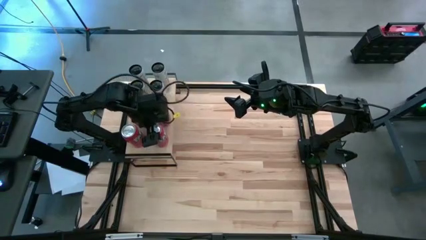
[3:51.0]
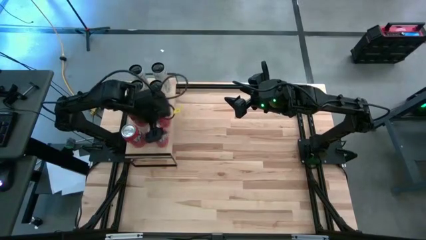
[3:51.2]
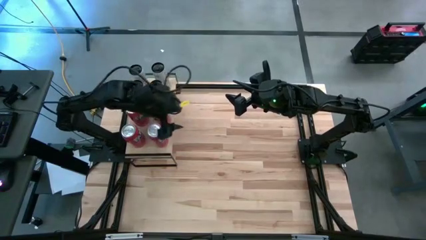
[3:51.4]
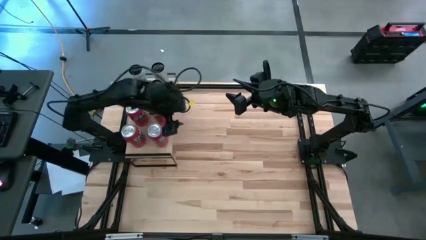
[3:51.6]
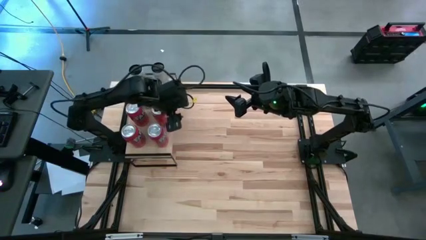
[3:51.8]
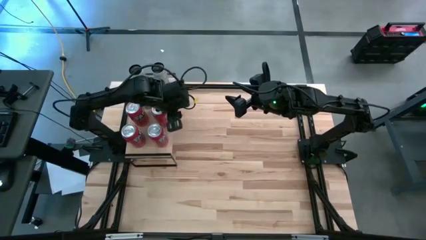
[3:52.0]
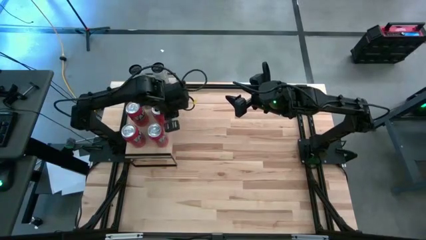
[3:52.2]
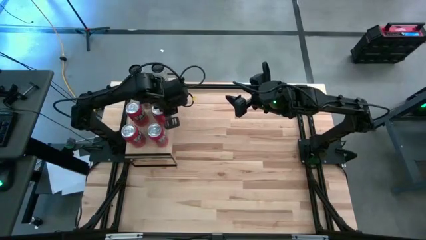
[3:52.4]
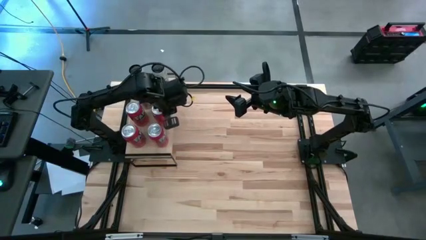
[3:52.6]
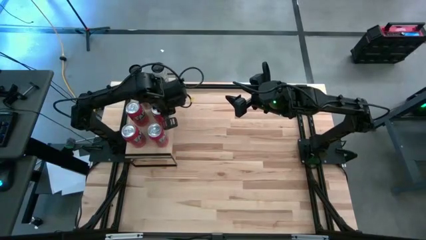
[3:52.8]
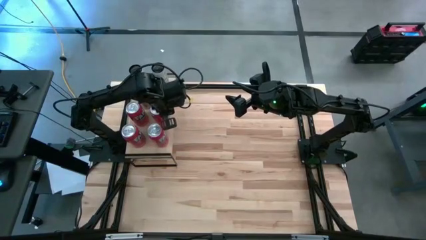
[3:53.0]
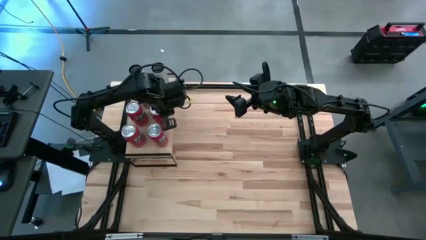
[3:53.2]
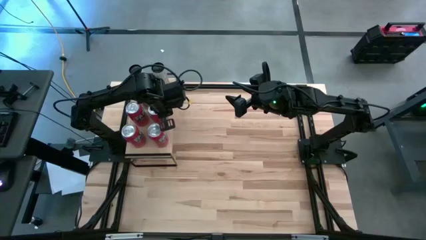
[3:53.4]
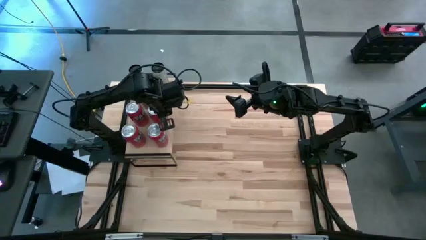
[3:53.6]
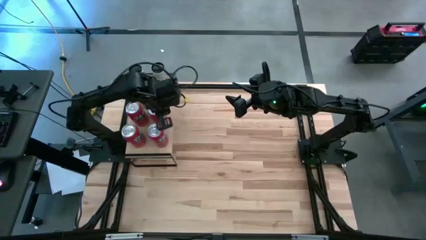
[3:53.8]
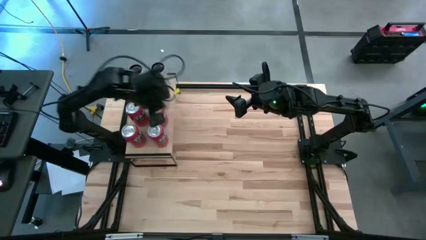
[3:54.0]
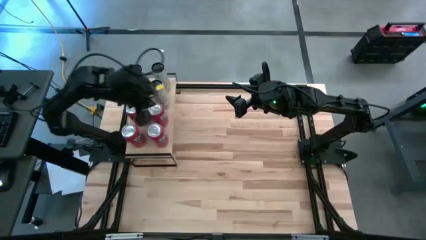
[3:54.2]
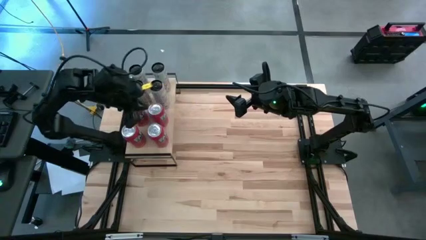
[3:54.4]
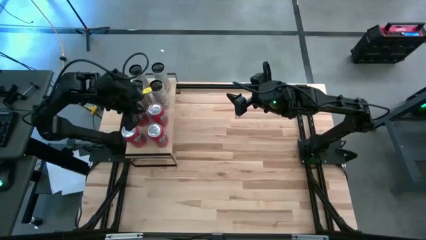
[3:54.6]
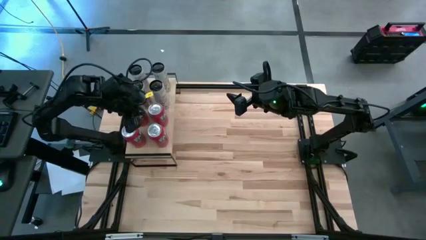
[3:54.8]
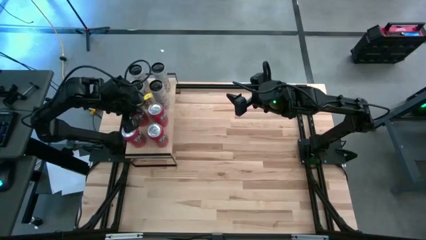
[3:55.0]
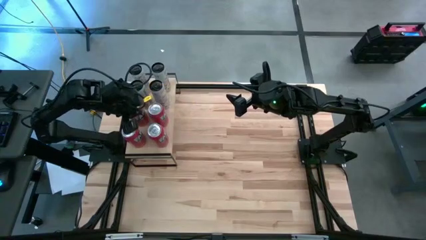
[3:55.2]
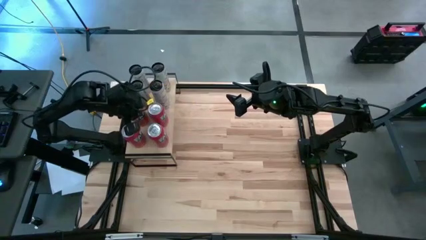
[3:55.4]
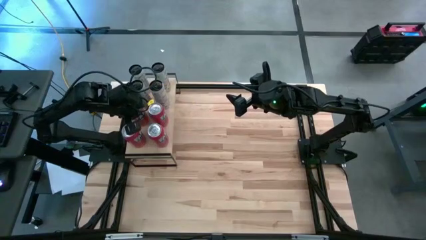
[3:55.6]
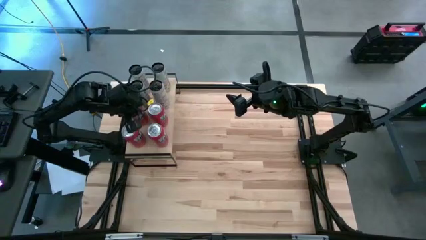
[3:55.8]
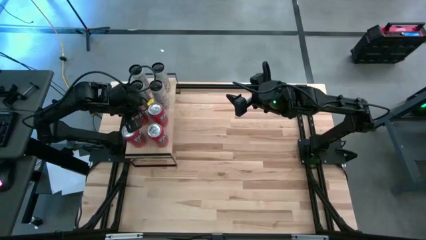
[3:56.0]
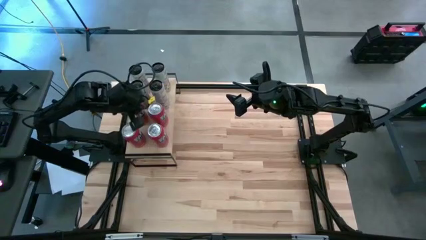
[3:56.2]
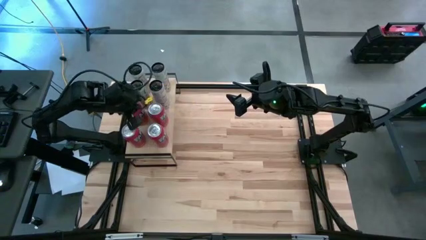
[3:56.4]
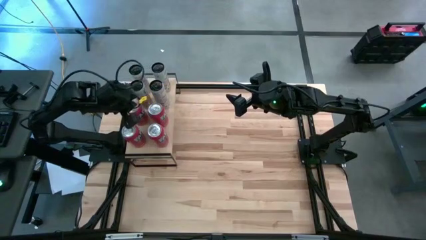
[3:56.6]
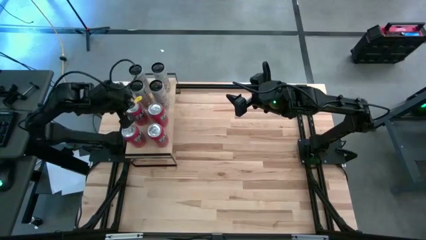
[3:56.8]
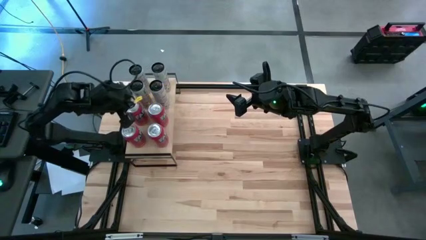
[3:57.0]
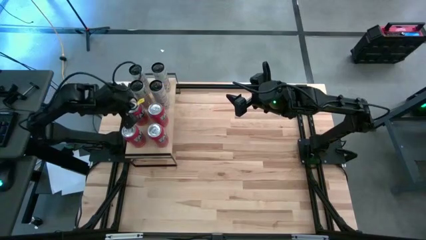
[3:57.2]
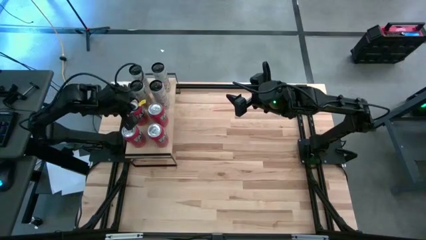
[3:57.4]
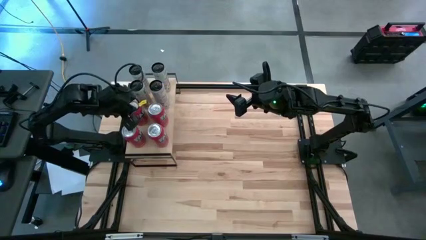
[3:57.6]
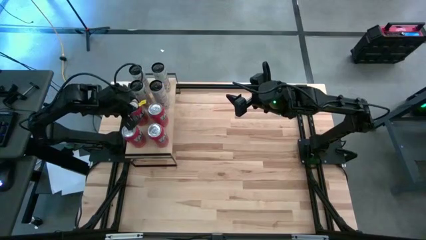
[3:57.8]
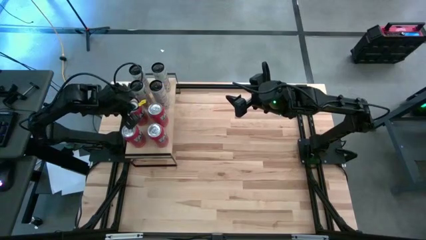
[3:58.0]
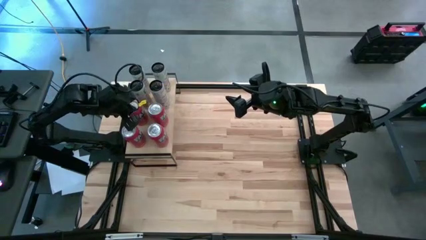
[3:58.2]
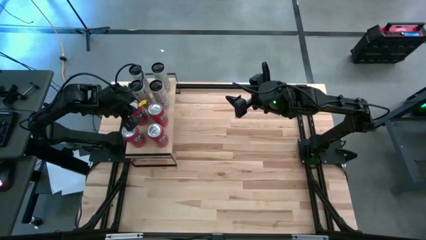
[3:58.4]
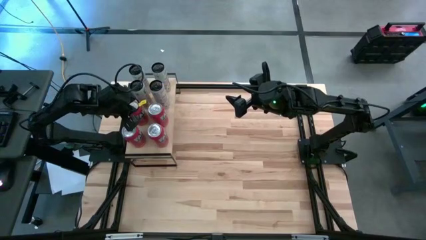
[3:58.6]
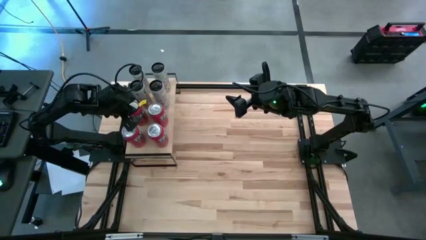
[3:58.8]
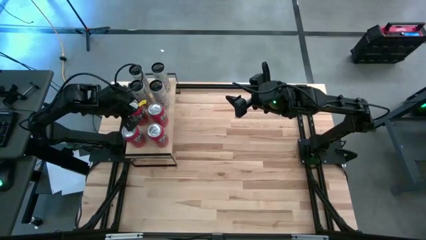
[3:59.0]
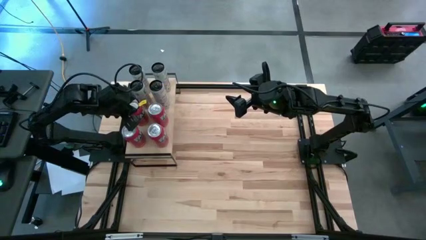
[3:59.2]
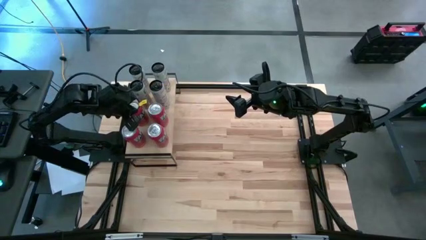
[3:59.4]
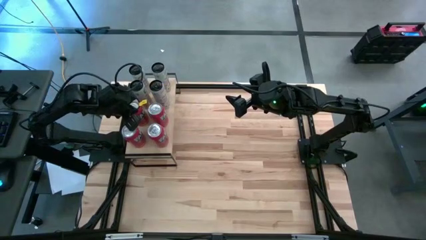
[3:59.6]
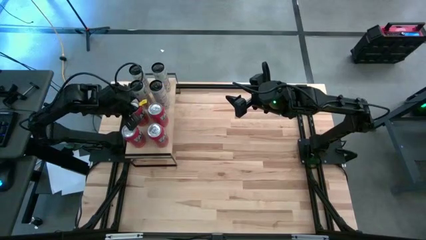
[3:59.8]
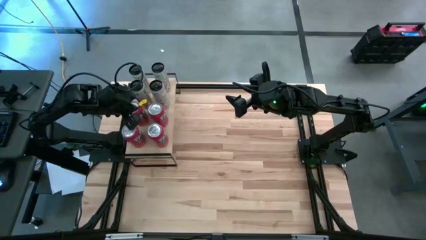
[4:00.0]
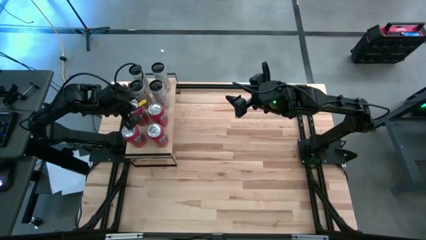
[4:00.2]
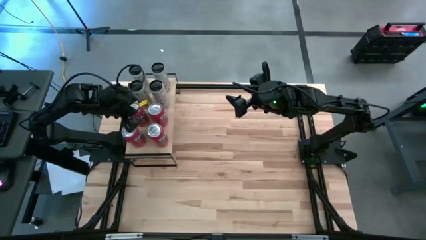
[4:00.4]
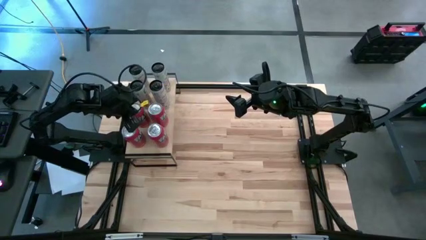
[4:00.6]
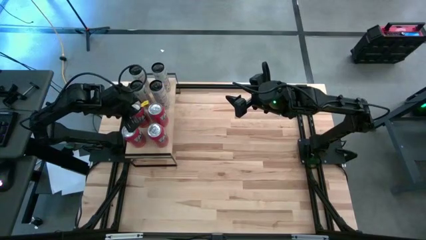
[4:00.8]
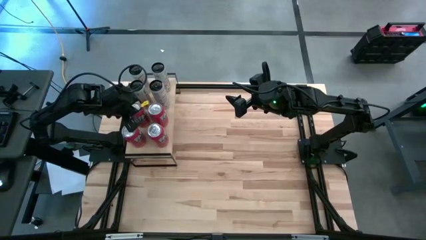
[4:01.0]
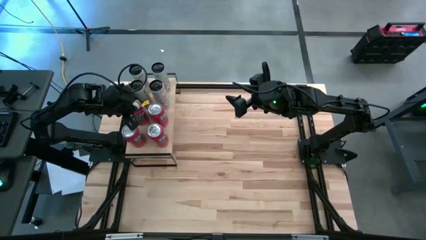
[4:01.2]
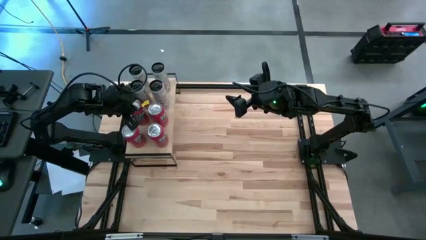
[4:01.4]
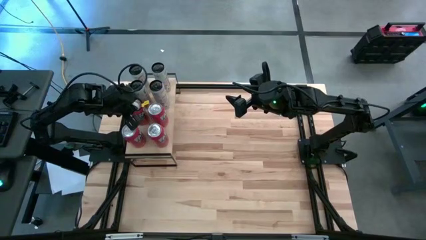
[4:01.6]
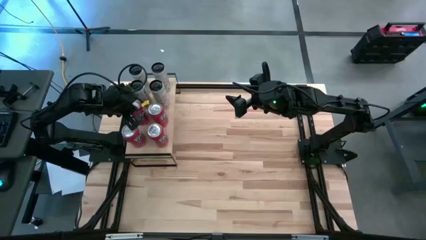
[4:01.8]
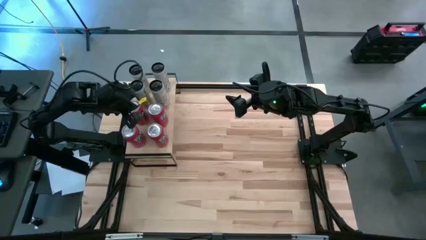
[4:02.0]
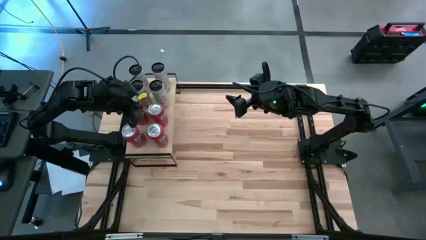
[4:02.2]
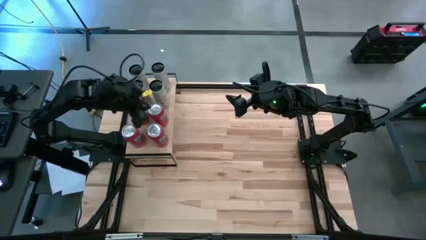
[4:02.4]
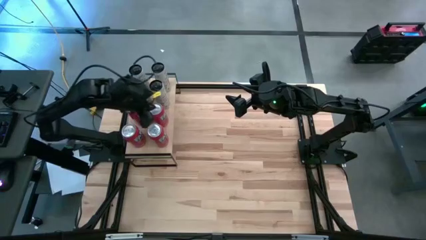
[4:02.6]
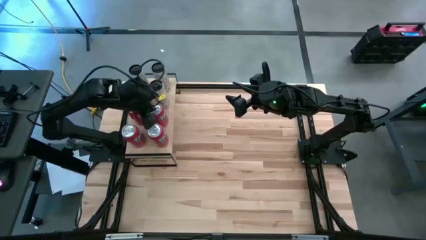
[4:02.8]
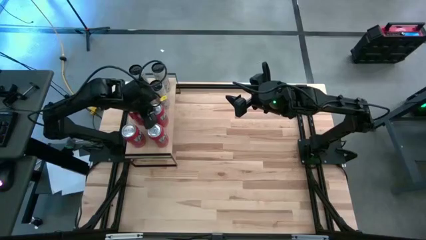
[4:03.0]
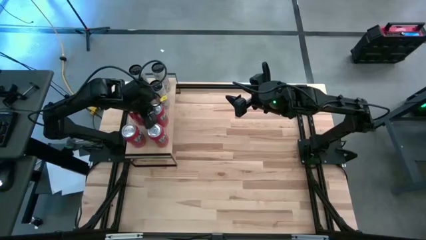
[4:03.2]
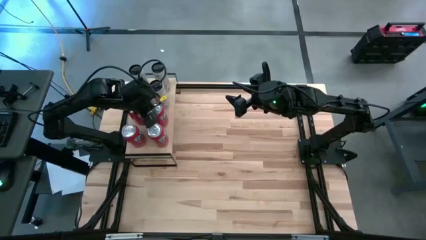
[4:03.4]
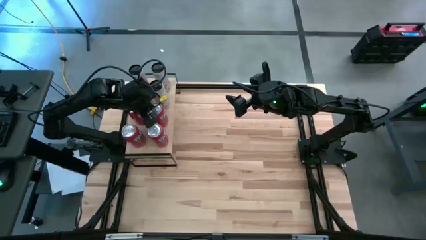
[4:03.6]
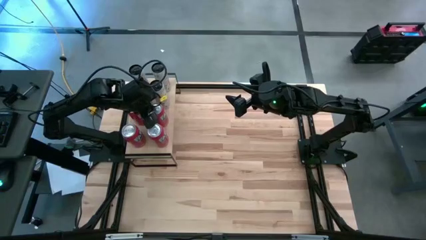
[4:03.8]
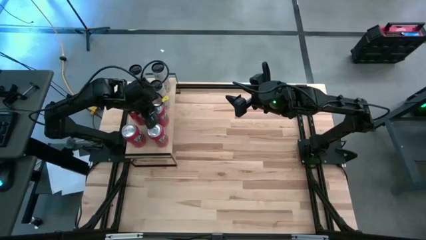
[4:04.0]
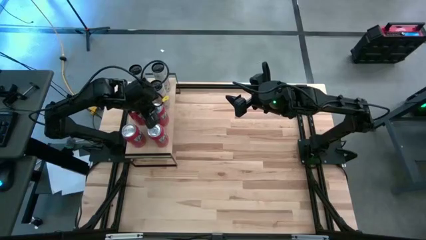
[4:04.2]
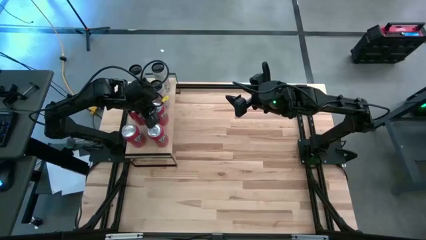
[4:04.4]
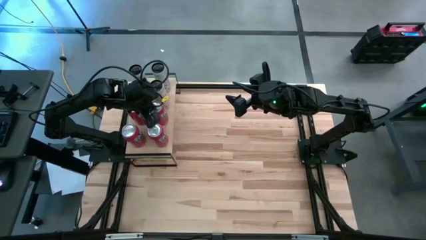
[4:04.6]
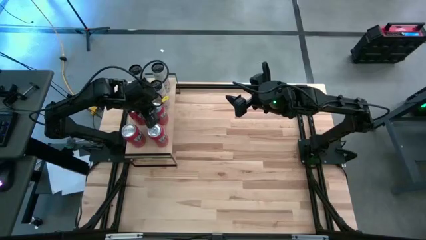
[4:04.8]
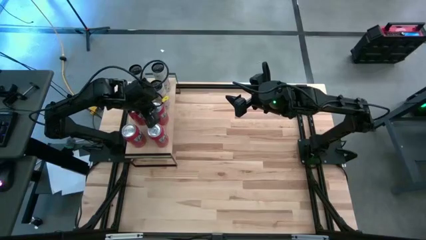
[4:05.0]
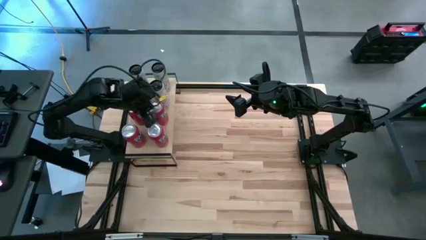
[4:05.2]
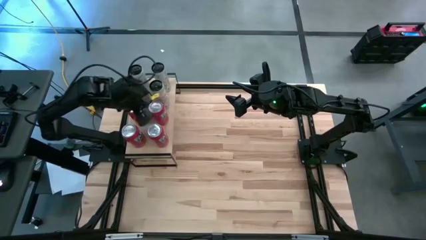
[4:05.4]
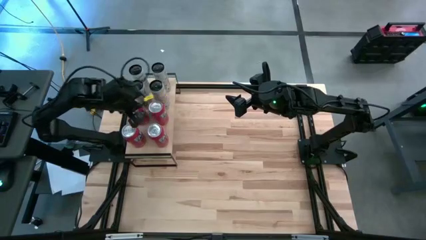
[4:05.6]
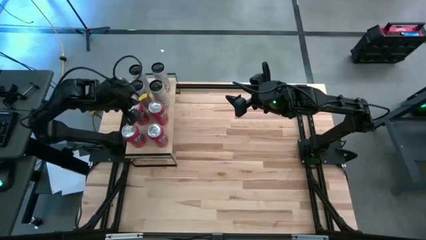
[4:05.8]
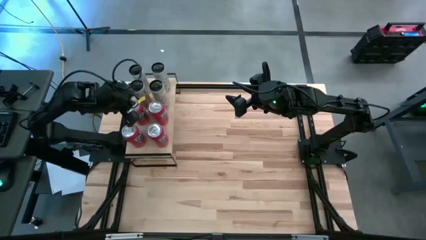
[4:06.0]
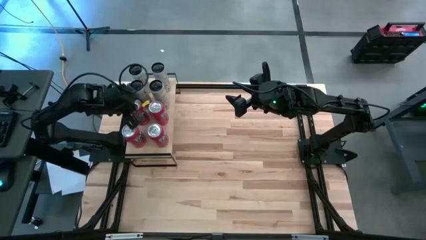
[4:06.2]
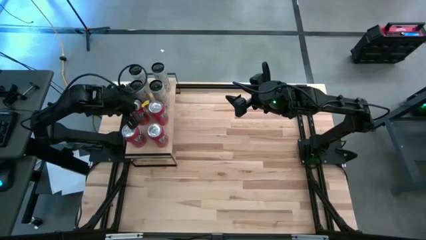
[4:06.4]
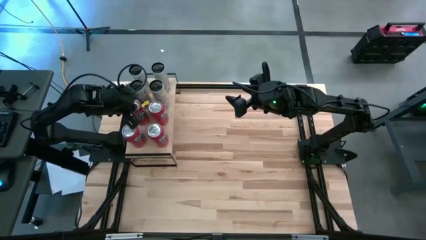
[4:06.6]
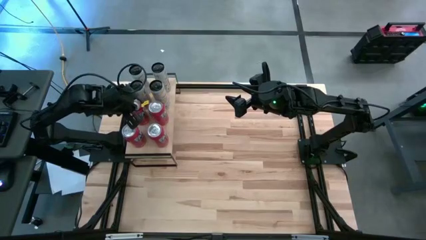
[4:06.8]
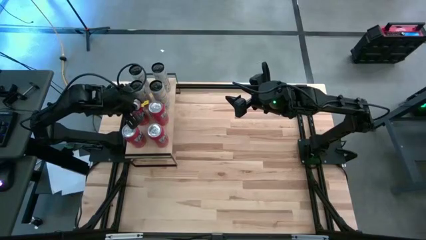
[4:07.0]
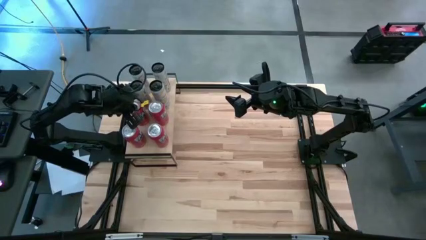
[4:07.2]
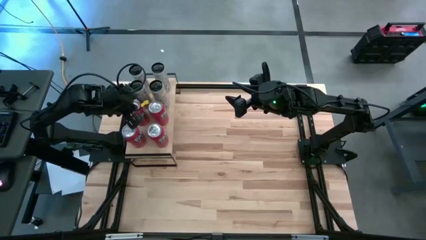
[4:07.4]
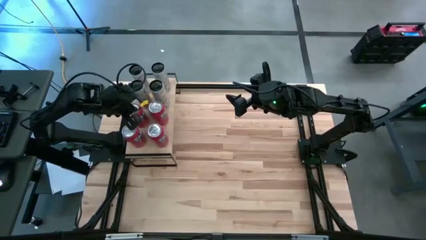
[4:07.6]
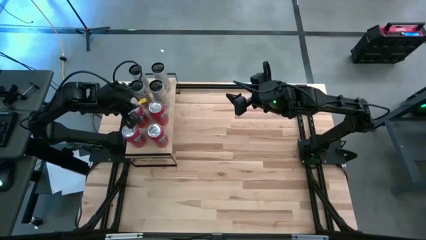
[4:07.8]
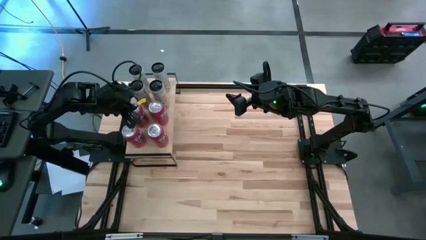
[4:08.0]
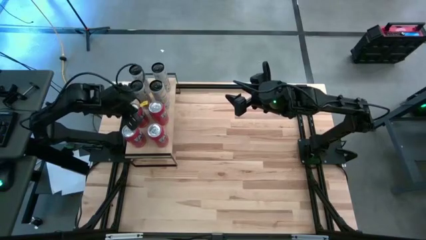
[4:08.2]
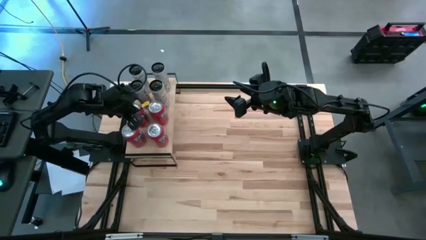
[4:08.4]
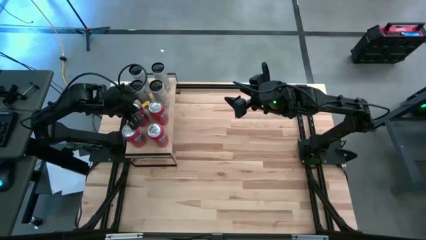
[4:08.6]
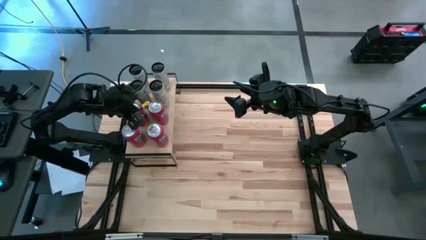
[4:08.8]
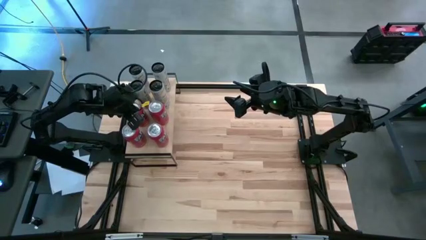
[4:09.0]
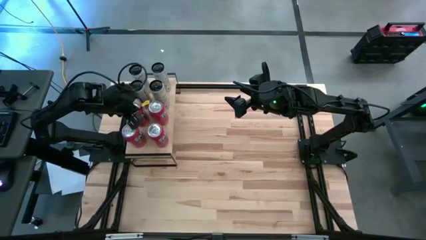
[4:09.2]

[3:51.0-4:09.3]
Task: Place canned beverage on shelf
Adjust the red soda cans
